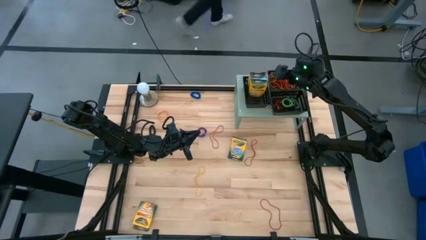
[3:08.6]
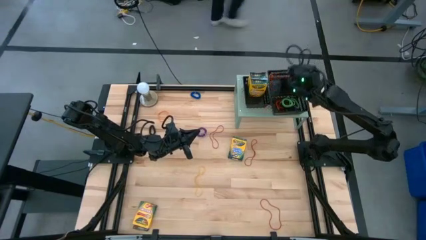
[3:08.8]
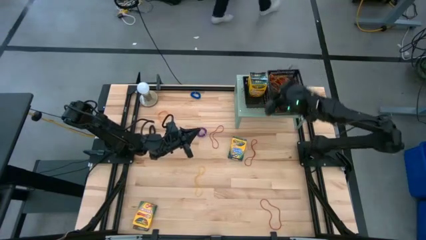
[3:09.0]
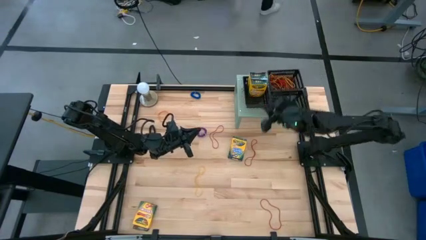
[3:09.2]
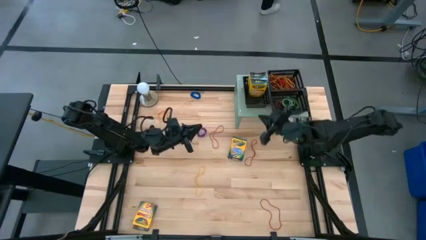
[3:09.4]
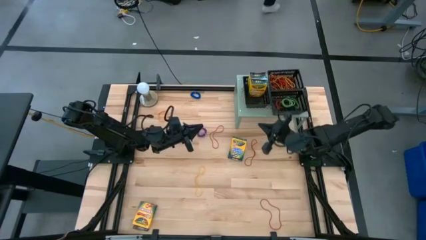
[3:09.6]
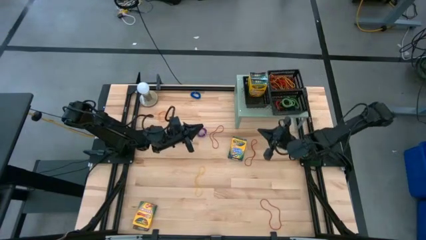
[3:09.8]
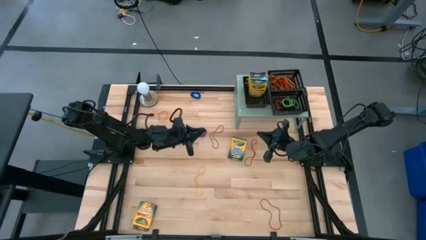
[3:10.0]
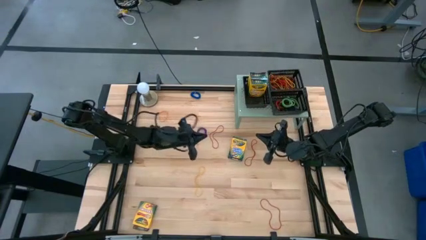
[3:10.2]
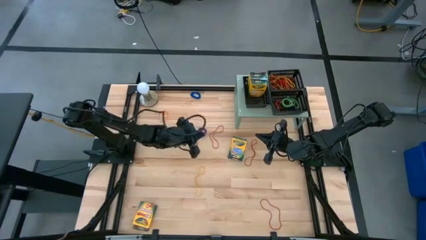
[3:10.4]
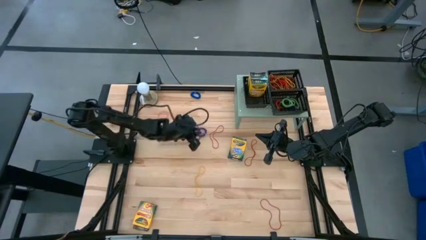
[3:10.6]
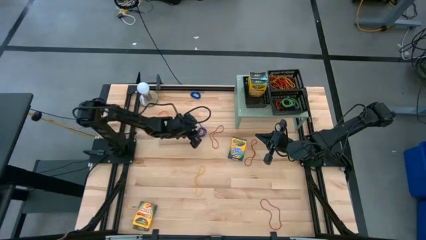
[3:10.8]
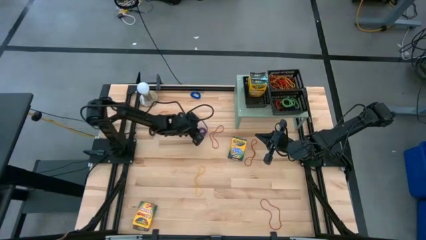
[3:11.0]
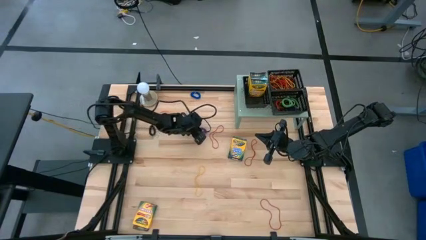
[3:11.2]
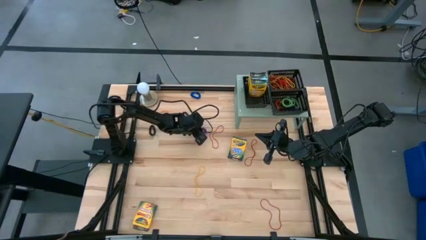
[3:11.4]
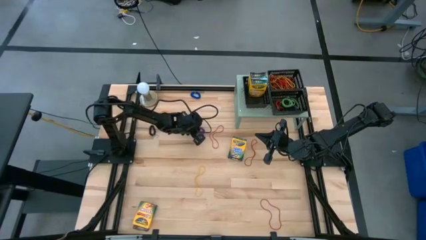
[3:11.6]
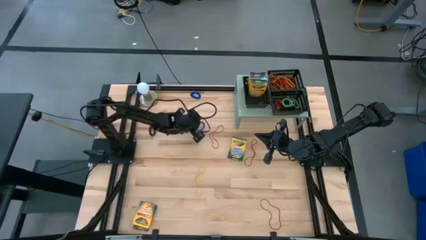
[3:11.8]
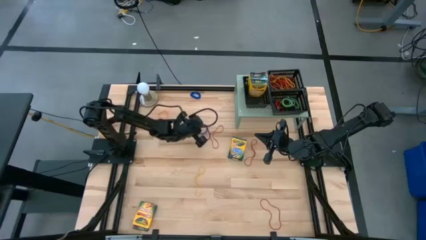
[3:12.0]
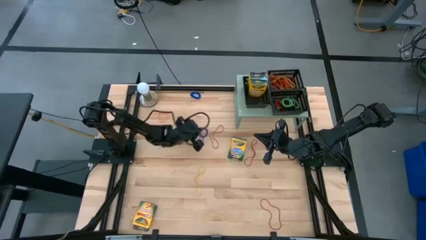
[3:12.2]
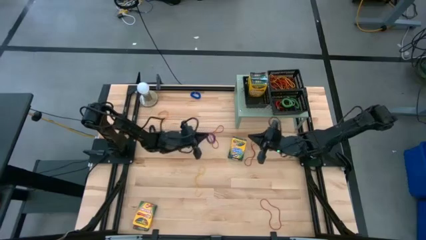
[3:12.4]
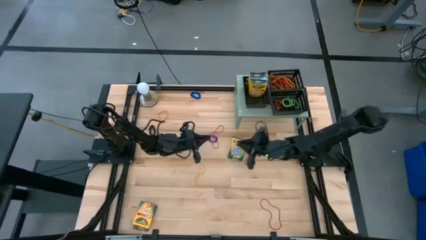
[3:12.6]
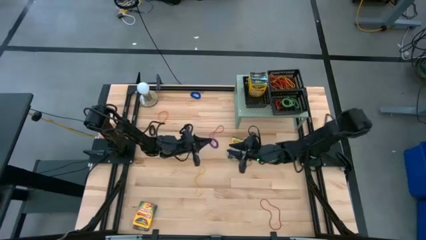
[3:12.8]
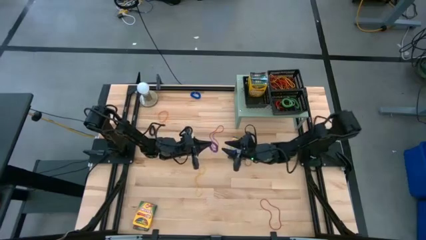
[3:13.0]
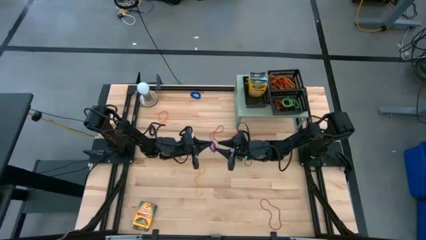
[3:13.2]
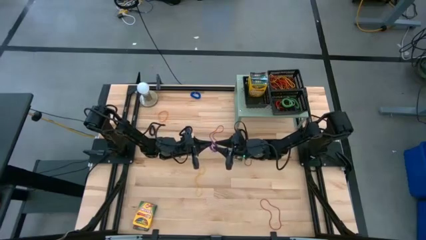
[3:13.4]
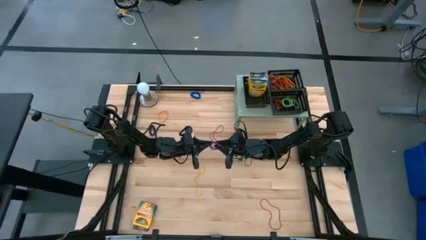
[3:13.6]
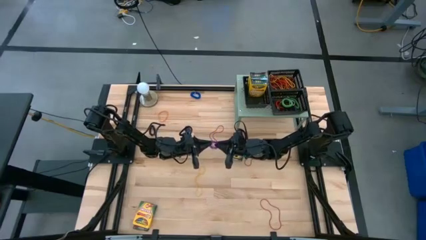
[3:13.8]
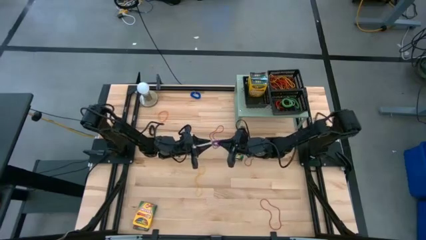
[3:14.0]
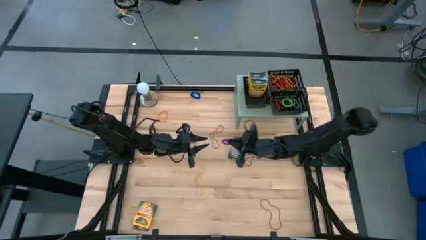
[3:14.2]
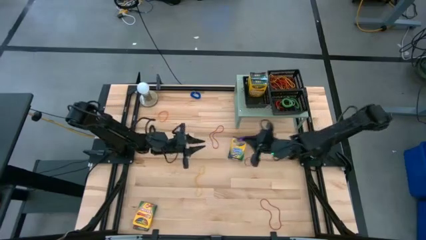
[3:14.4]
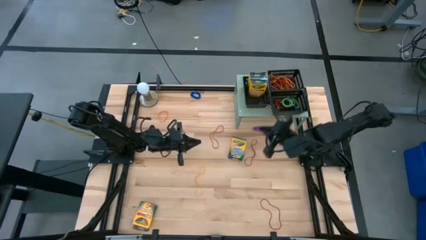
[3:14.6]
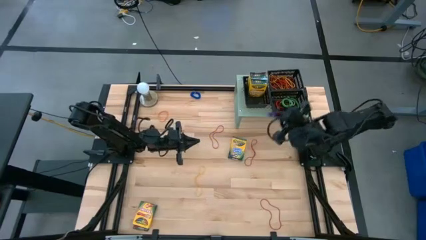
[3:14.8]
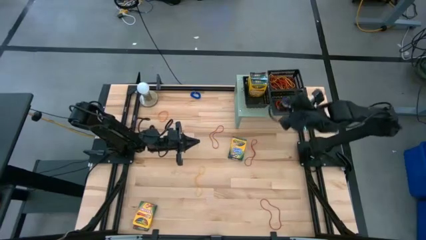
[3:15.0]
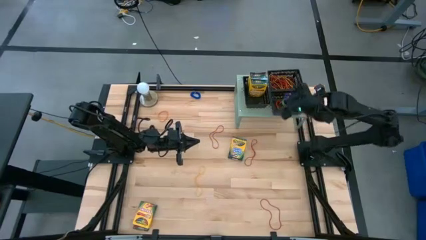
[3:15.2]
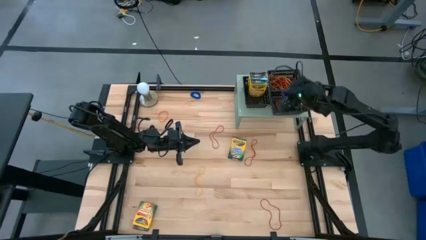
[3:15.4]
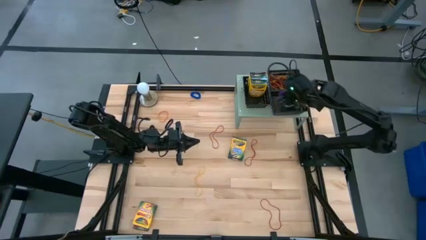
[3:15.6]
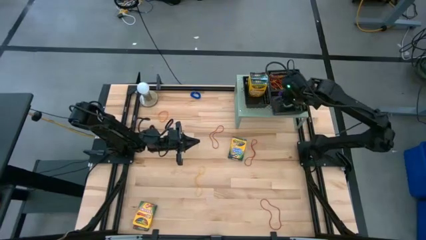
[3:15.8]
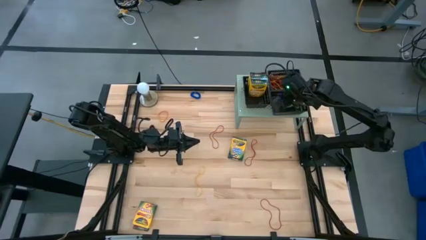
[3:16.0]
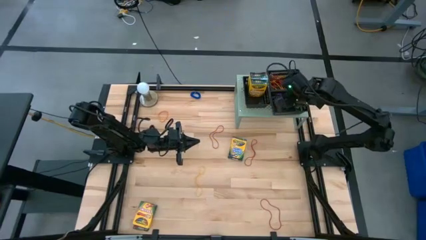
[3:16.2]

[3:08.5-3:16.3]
Task: Pick & Place Office Desk Supplies
Put the violet spring keychain into the bottom right black bin on the shelf

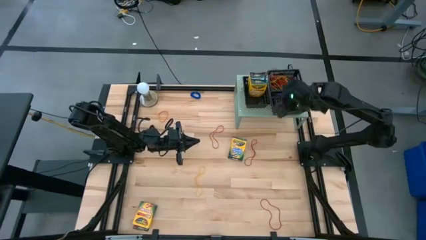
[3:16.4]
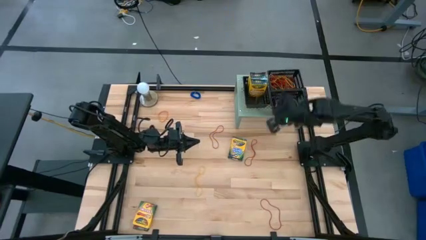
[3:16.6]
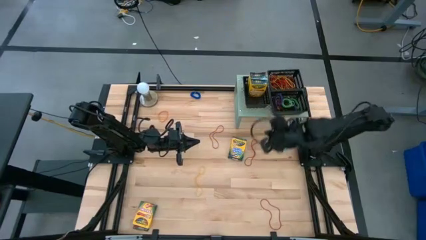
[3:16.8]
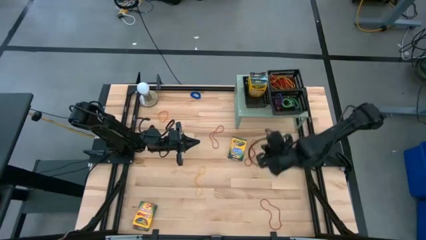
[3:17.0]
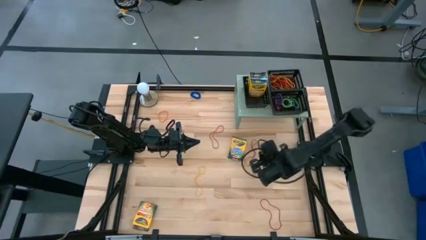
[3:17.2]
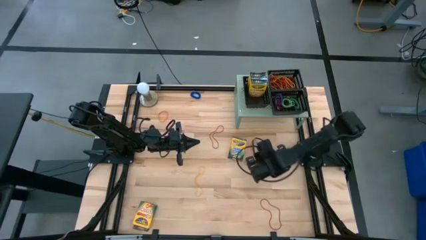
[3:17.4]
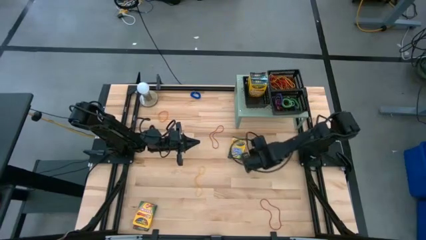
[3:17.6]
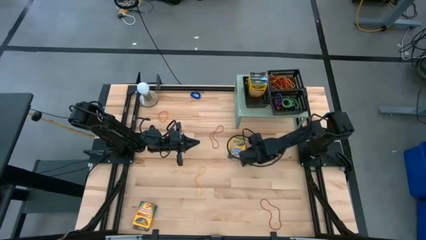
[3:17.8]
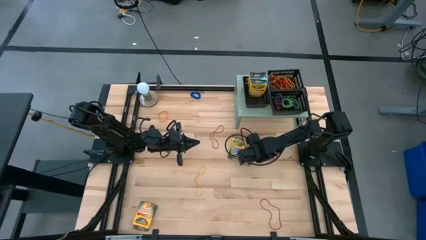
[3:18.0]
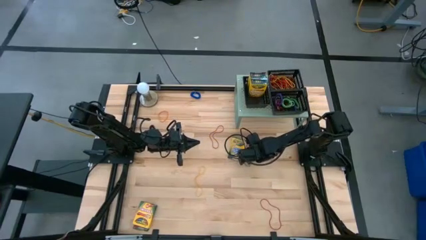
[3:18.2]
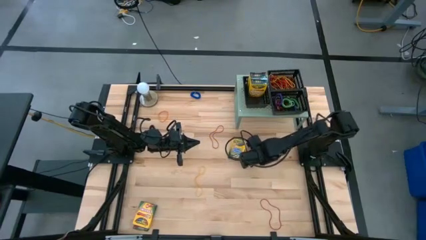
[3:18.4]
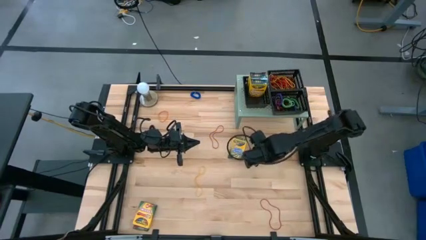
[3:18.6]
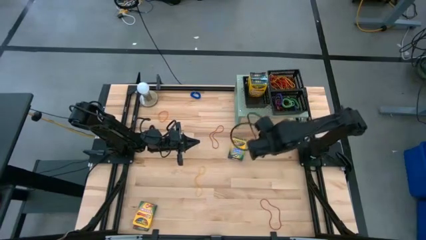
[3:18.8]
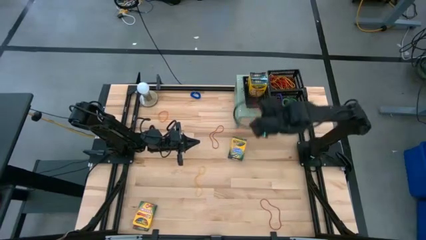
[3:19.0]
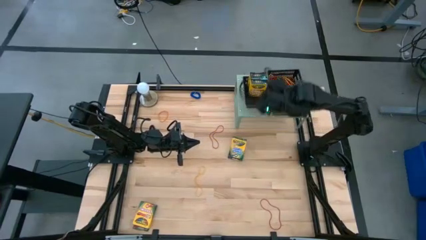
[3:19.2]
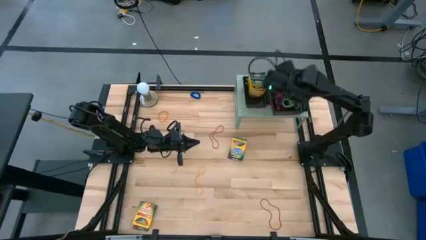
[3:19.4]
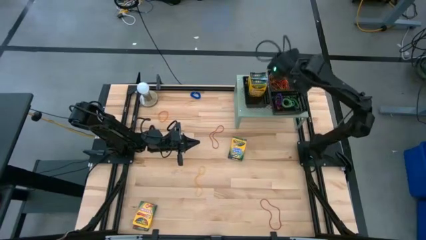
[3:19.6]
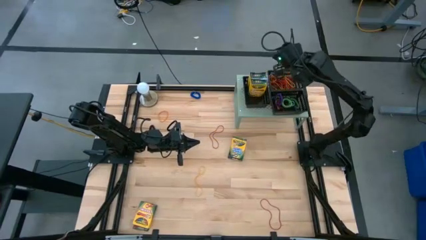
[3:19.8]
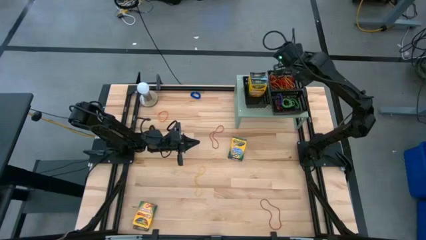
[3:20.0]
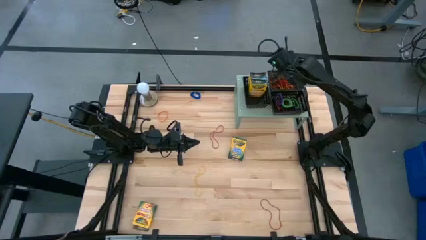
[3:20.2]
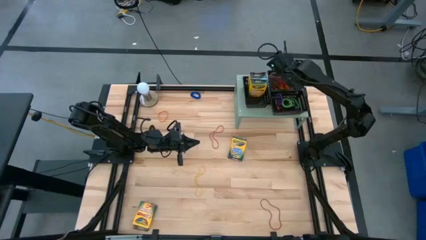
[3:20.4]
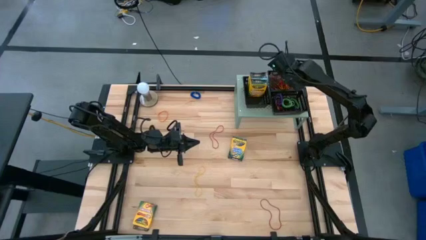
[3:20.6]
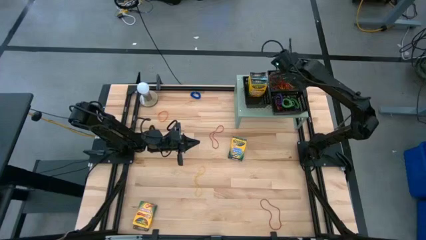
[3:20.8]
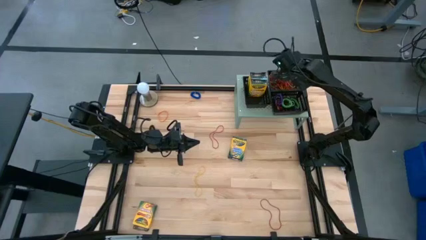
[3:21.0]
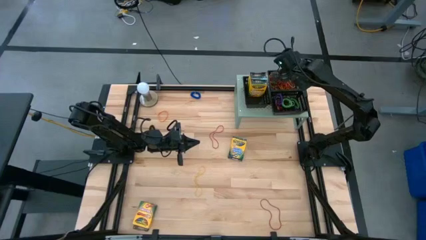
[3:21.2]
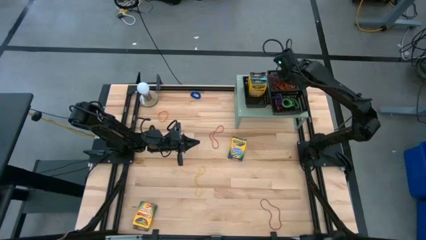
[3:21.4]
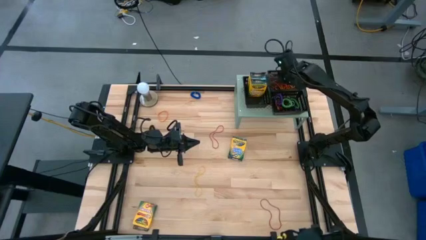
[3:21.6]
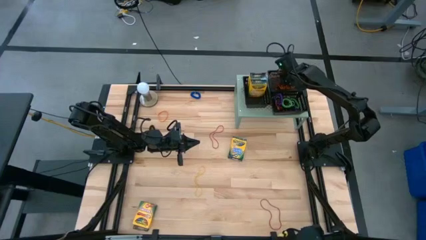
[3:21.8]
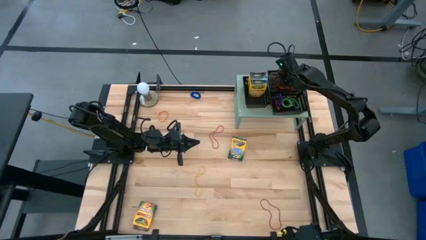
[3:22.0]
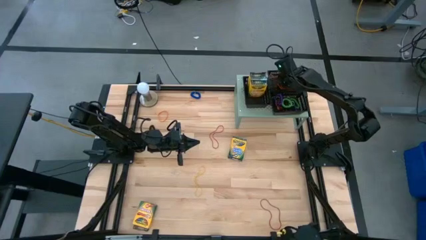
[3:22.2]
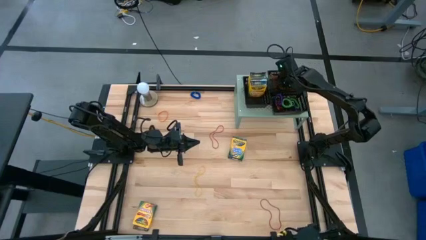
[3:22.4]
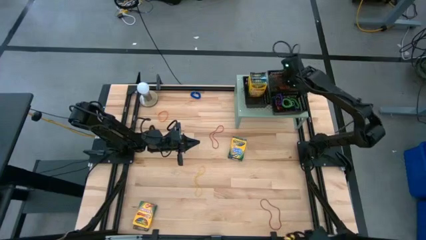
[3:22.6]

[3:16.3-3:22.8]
Put the red rubber band into the top right black bin on the shelf

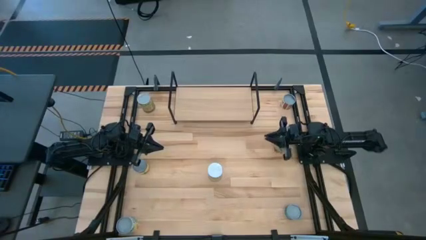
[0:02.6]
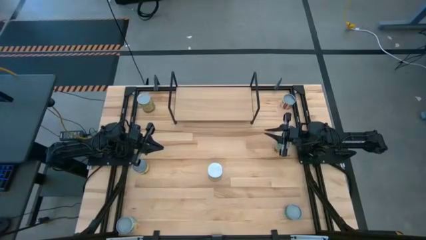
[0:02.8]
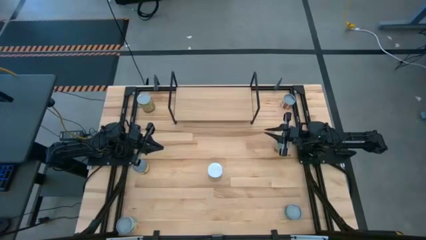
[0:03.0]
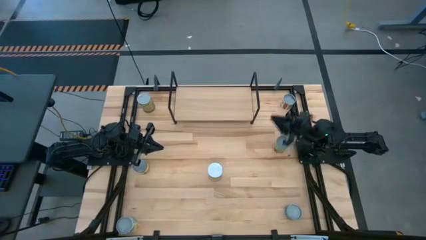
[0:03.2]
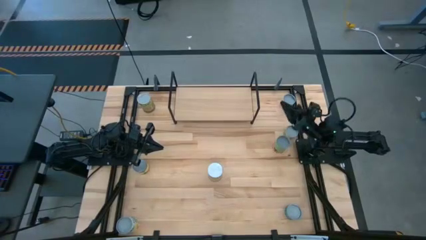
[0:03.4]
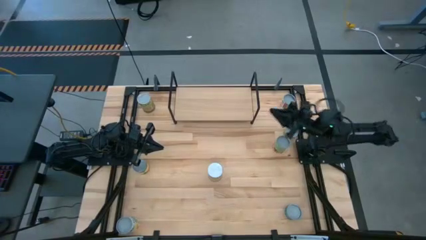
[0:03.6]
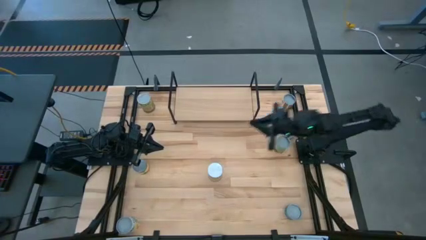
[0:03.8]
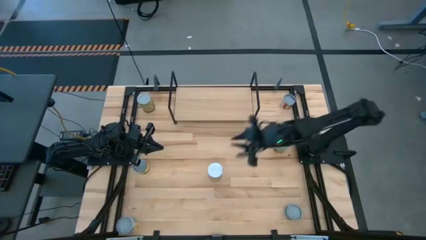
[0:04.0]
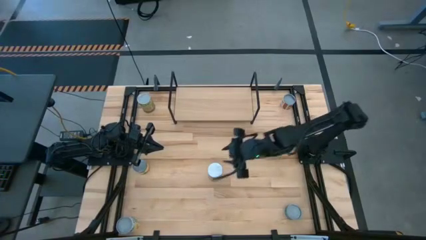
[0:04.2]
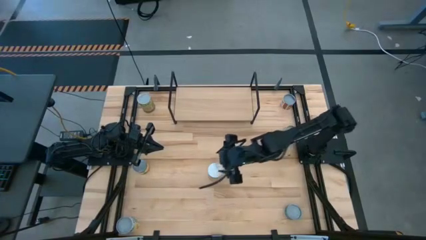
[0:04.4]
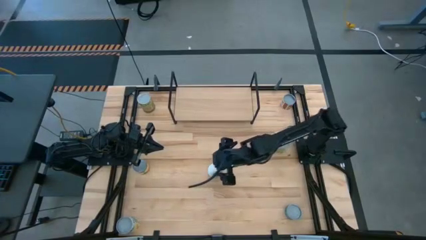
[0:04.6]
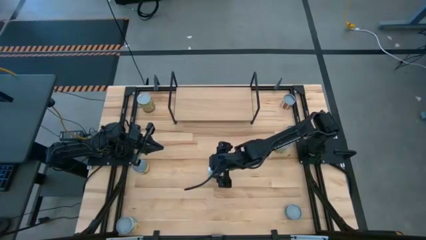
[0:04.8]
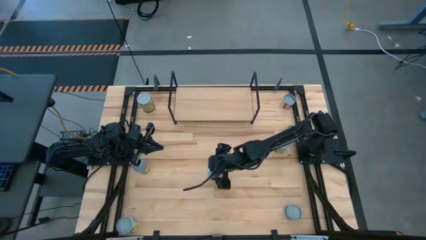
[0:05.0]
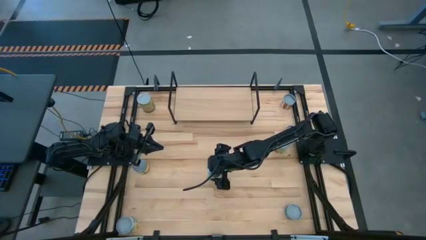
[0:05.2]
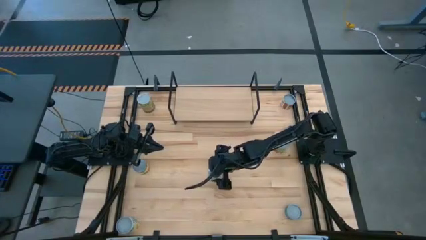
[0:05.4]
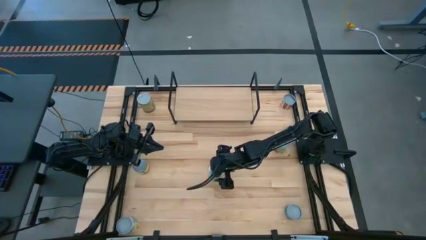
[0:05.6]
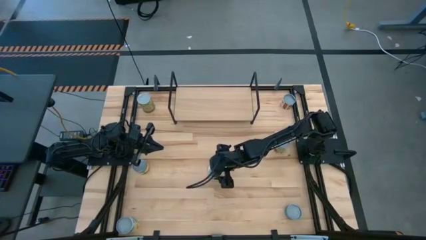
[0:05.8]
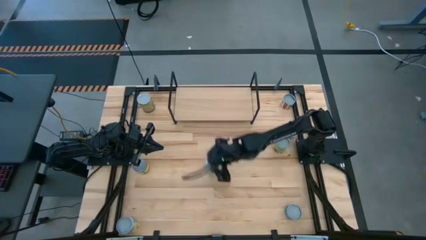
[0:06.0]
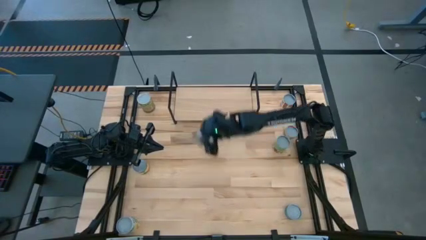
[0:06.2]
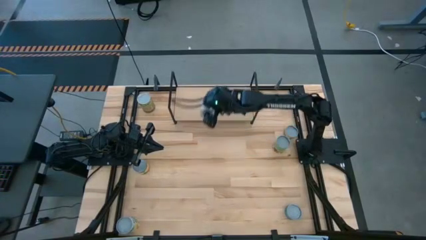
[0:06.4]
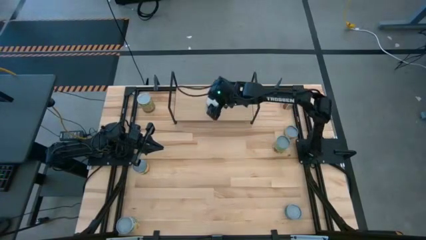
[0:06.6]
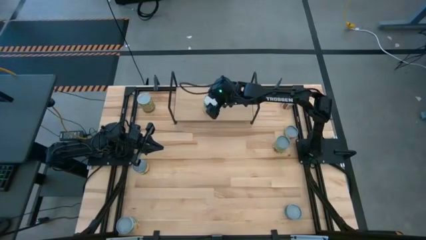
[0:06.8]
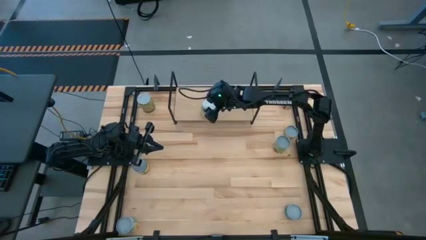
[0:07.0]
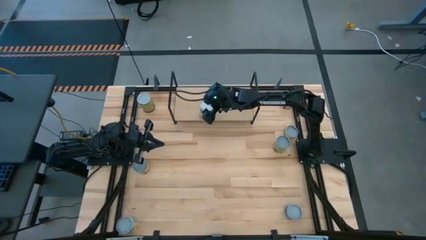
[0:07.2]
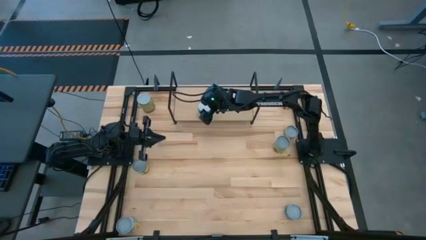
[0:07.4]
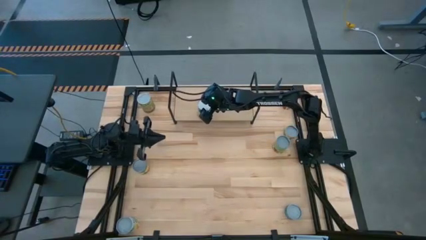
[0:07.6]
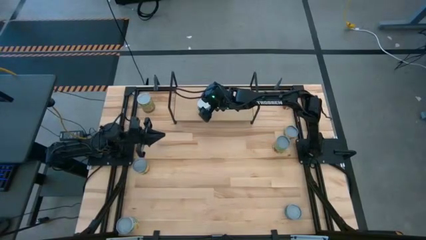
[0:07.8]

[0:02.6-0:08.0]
Task: Pick and place cans onto a shelf
Put the canned carrot on the shelf
